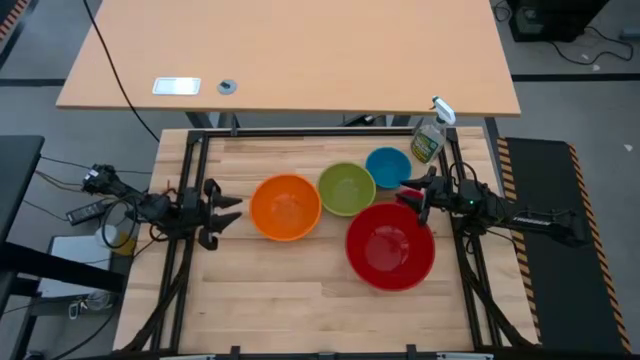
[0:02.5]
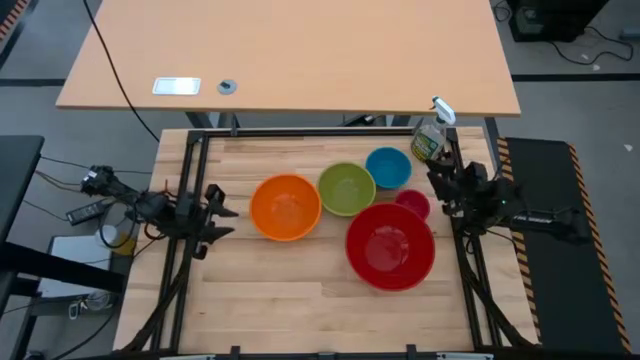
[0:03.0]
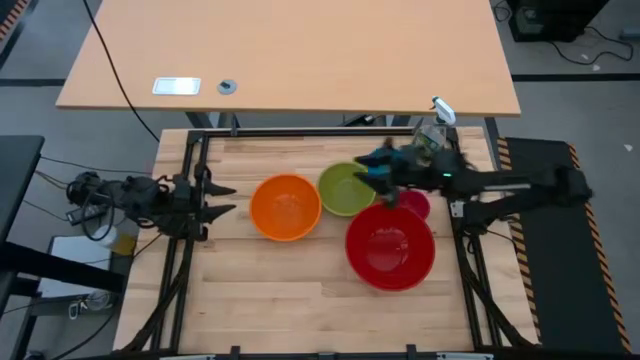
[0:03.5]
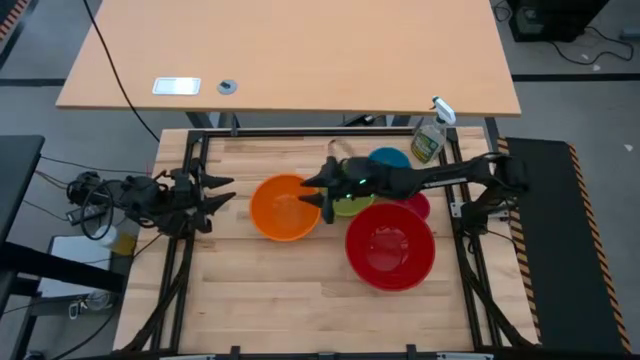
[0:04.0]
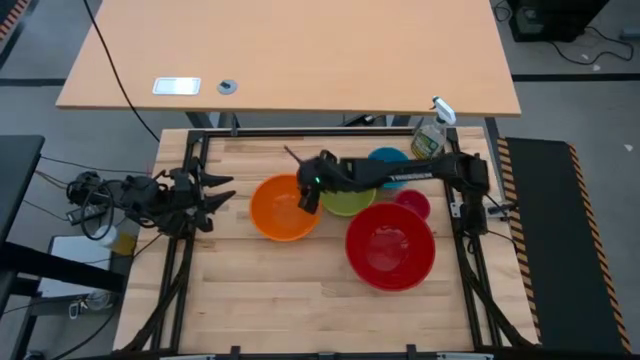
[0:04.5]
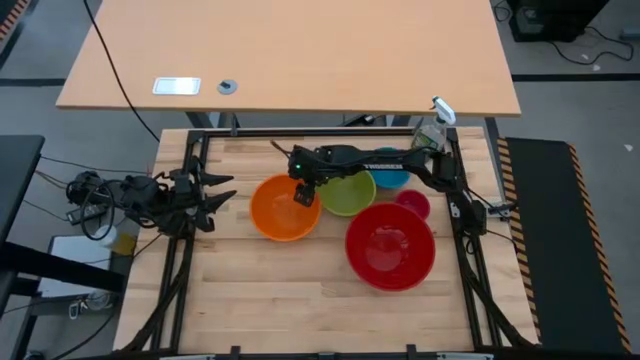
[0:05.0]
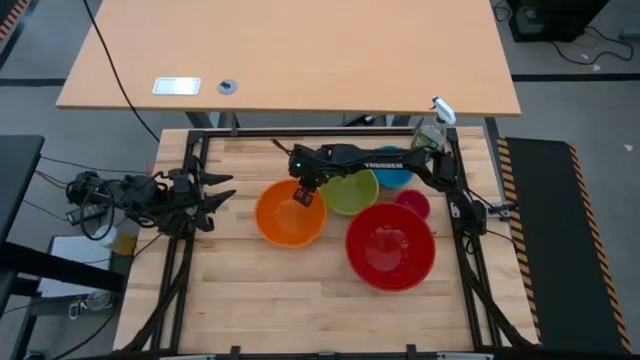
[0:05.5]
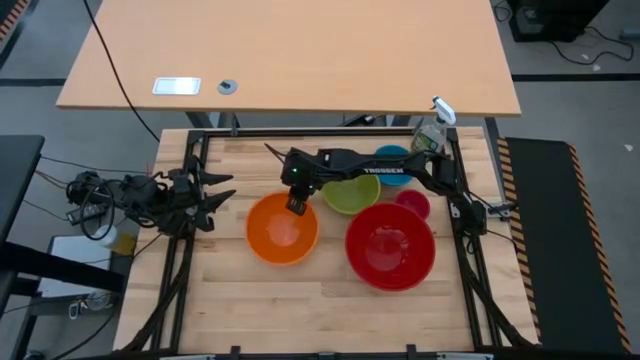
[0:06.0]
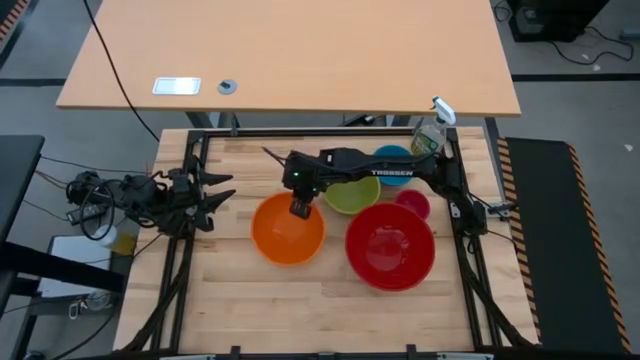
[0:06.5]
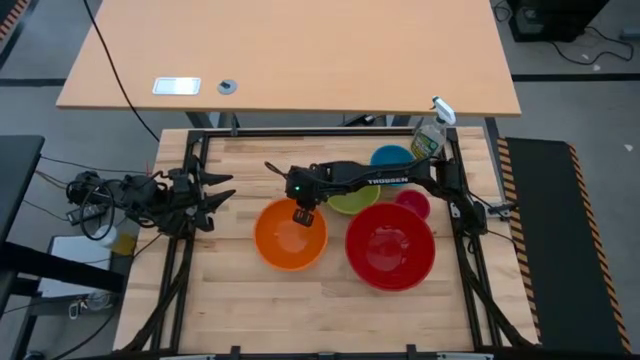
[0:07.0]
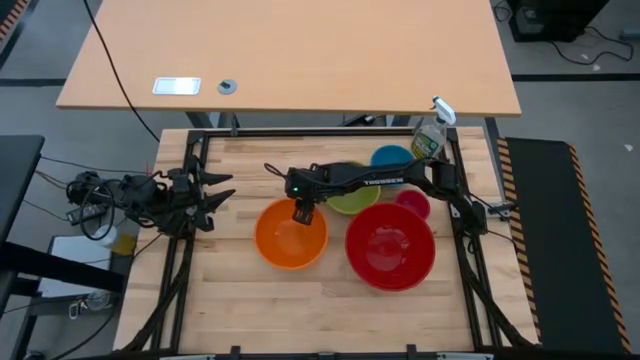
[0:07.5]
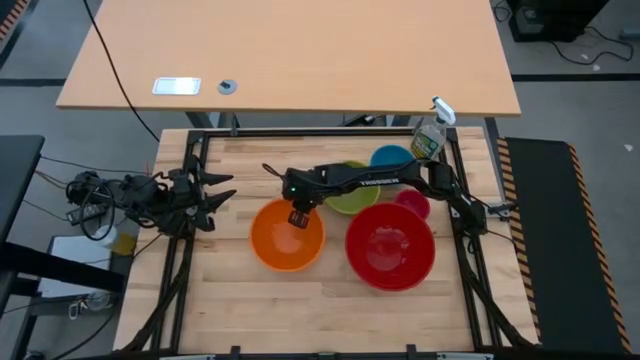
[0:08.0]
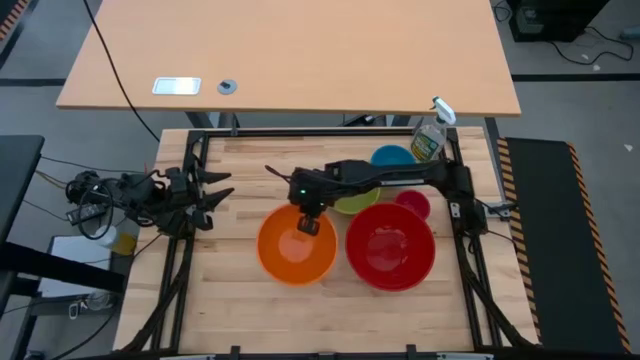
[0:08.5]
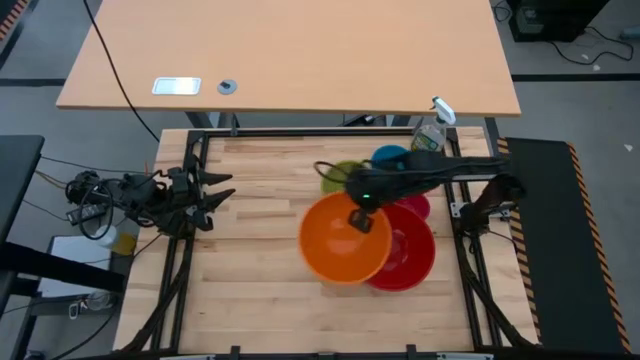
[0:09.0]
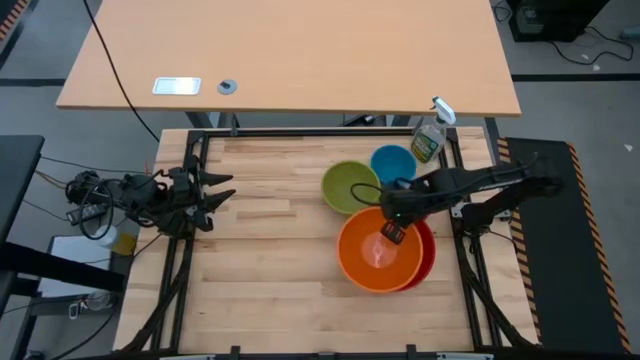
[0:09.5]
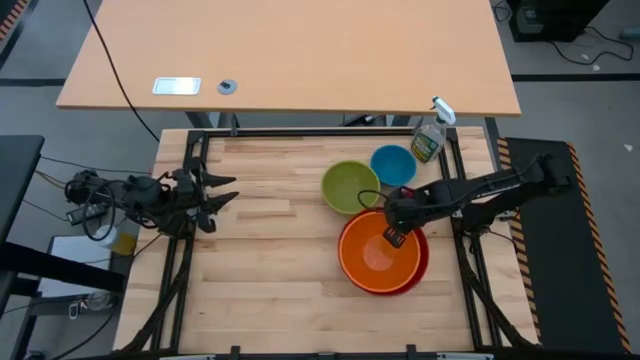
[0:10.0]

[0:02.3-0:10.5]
Stack the orange bowl on top of the red bowl

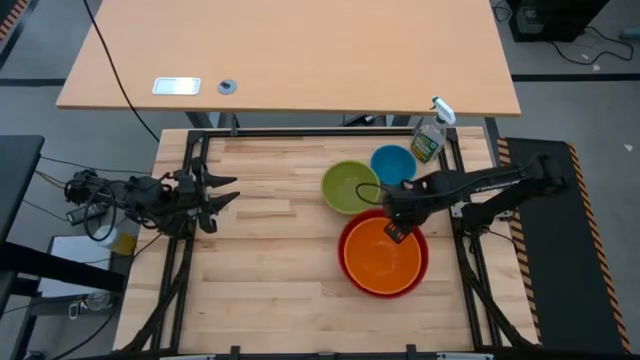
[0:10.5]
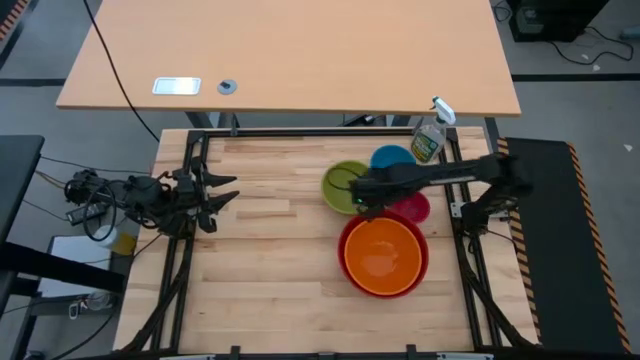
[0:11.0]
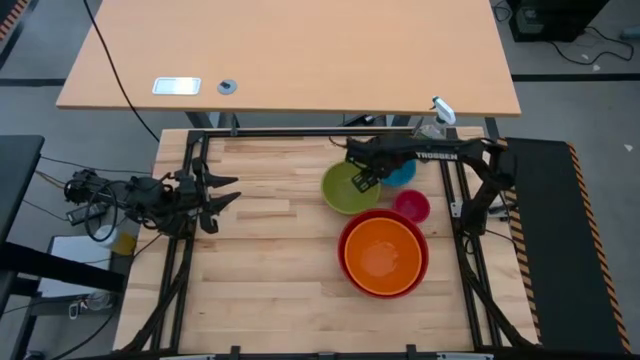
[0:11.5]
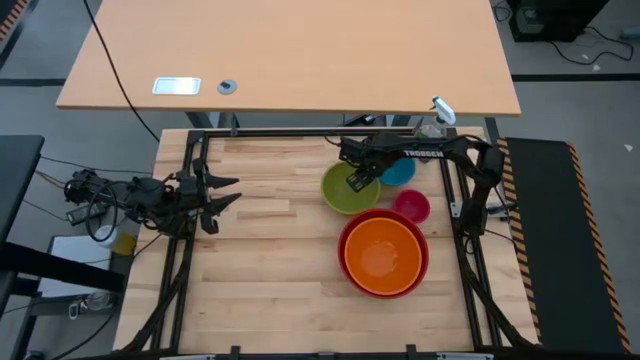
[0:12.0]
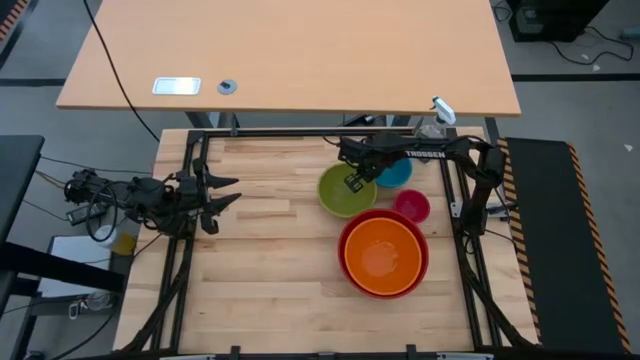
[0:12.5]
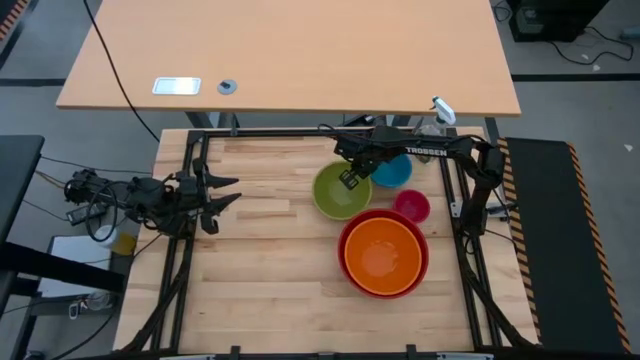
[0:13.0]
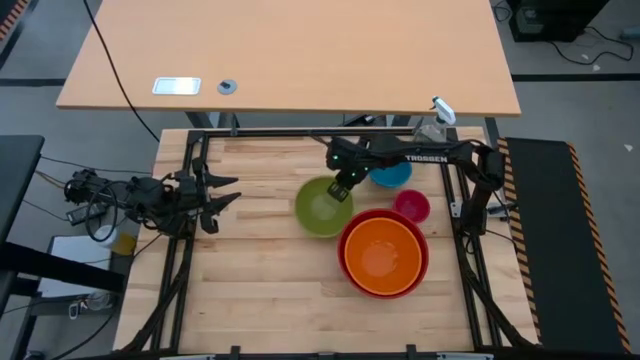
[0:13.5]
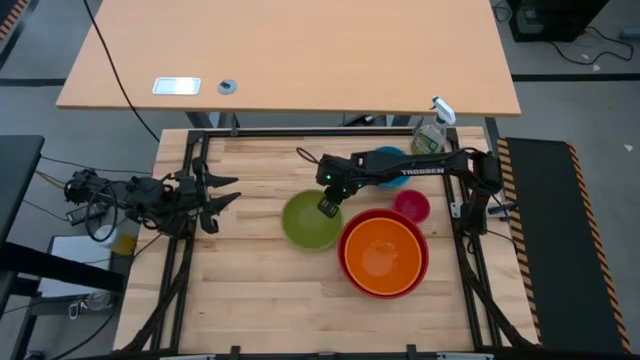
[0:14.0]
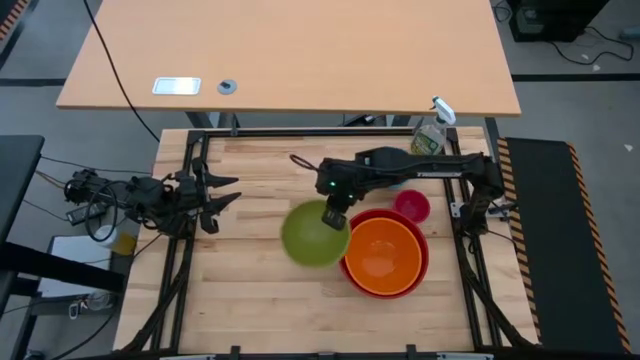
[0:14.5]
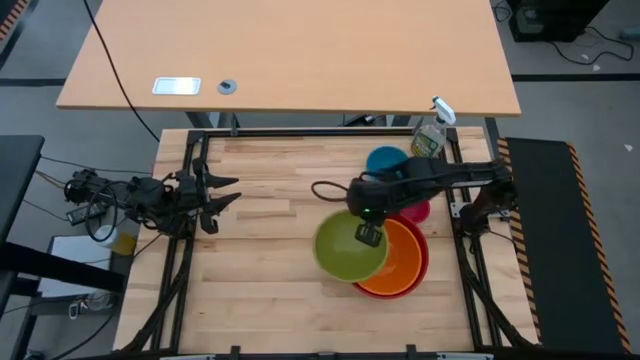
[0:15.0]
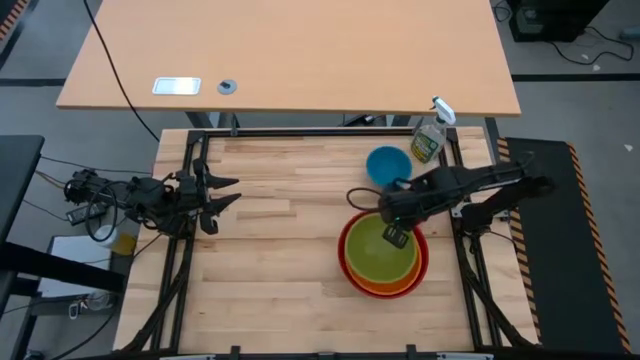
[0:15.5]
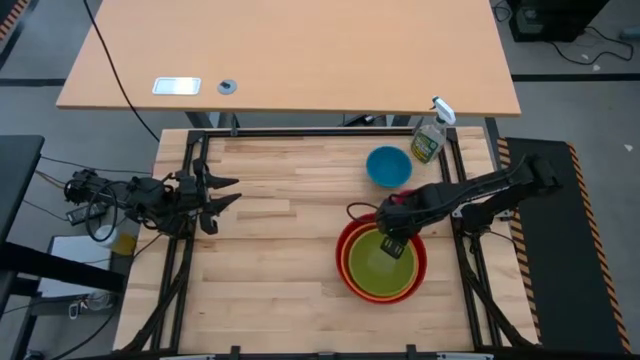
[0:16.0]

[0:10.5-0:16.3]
Stack the green bowl on top of the orange bowl

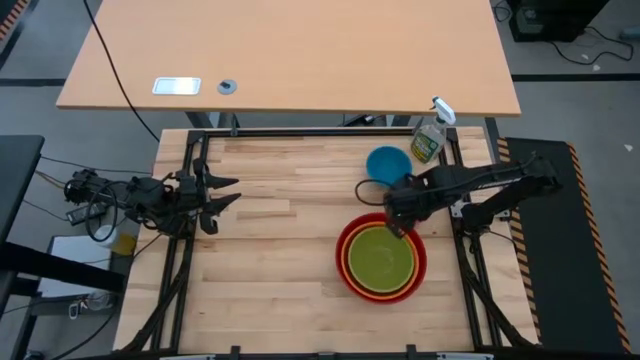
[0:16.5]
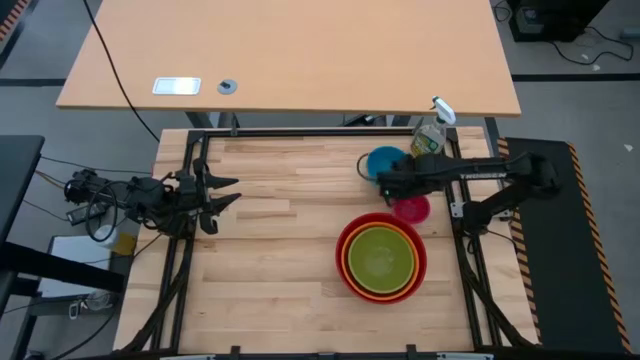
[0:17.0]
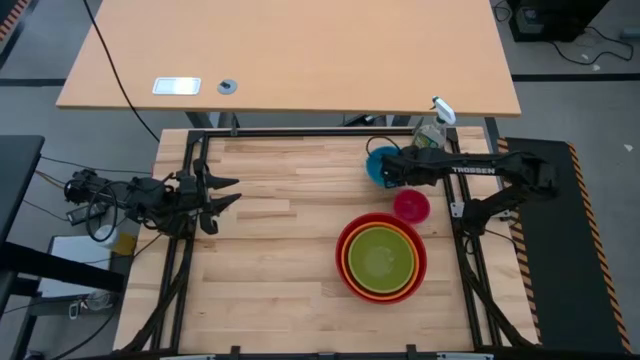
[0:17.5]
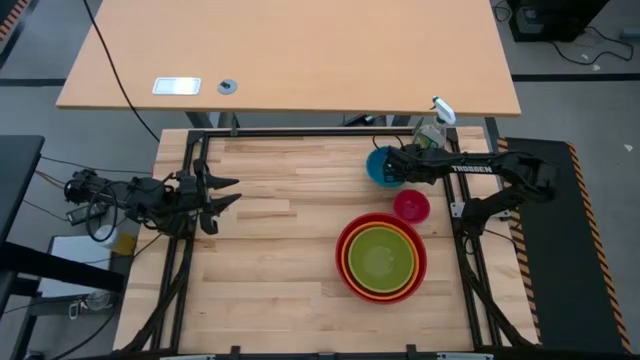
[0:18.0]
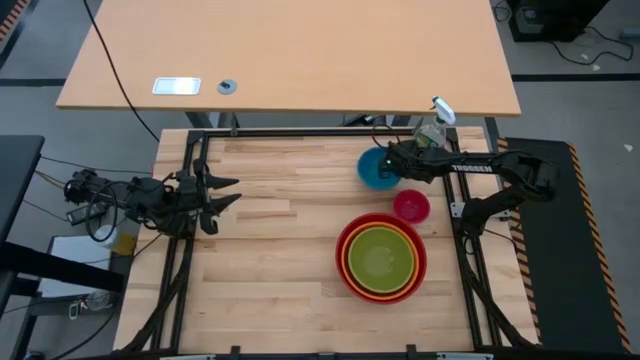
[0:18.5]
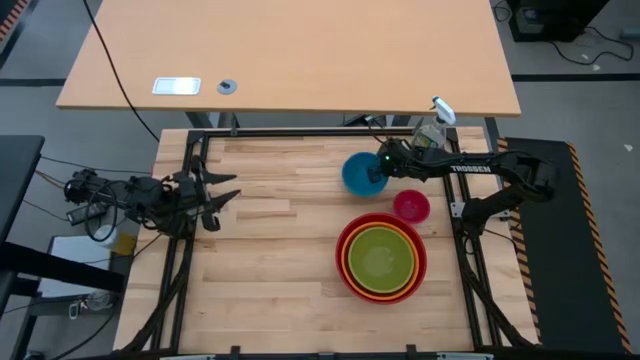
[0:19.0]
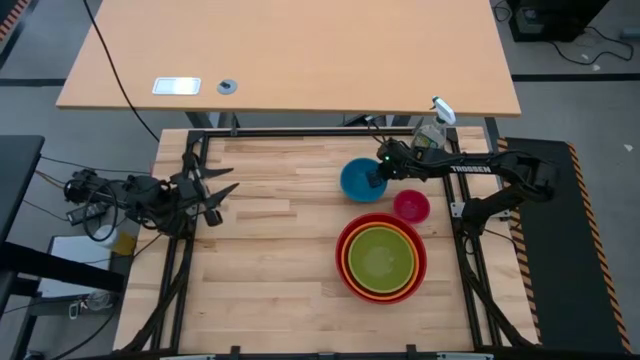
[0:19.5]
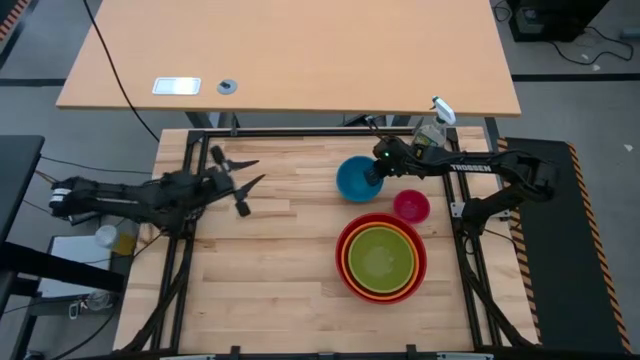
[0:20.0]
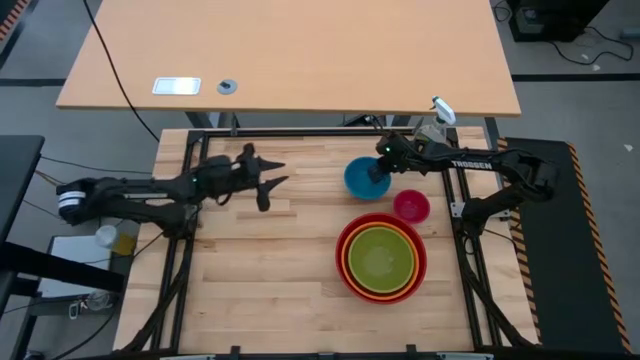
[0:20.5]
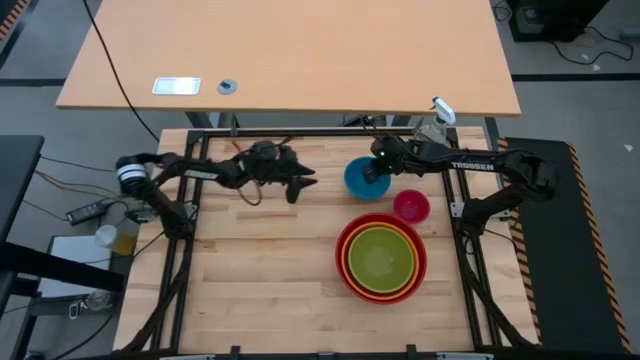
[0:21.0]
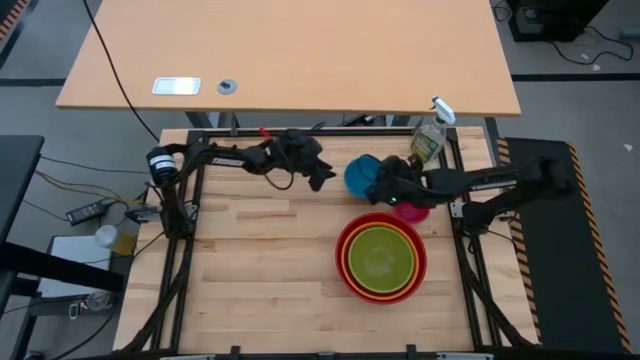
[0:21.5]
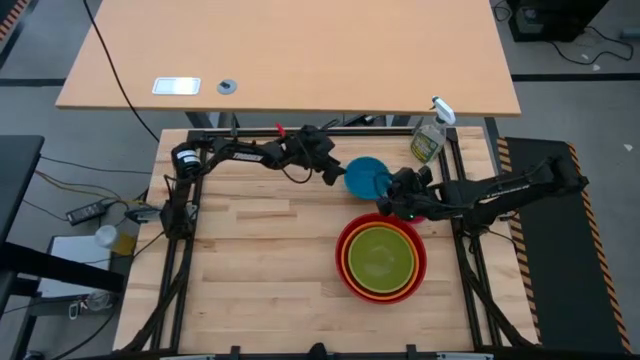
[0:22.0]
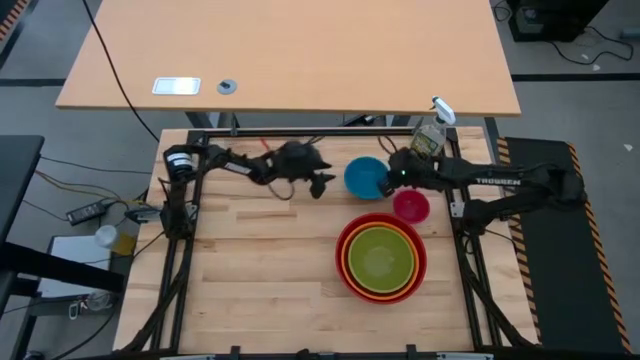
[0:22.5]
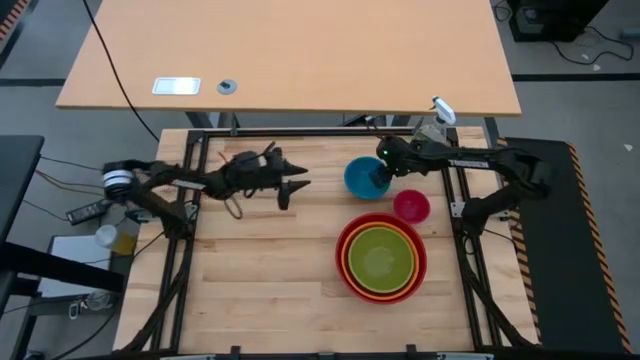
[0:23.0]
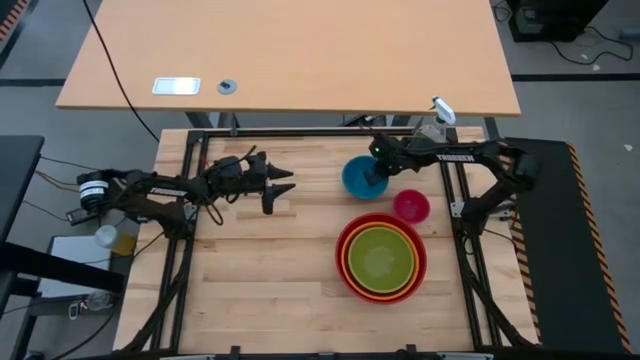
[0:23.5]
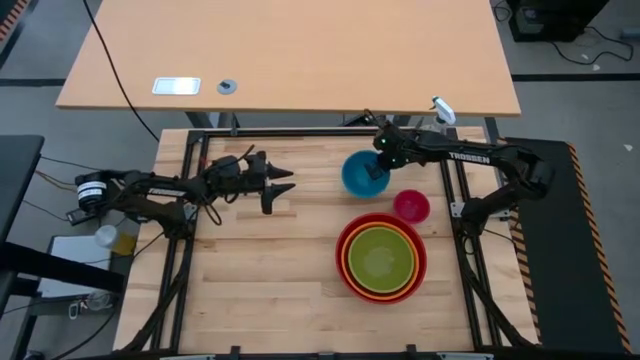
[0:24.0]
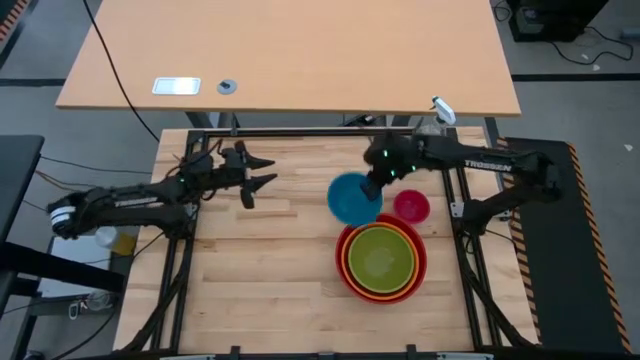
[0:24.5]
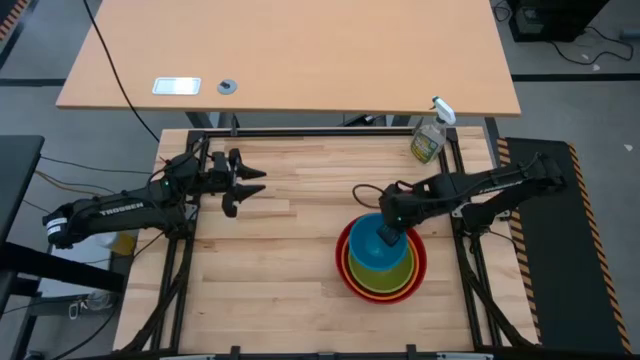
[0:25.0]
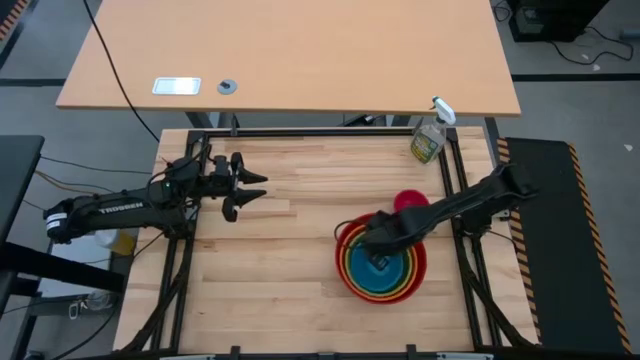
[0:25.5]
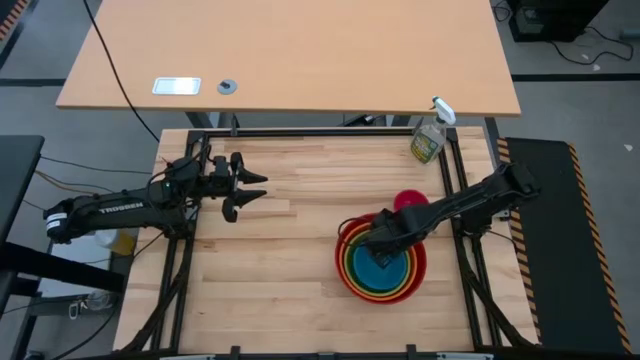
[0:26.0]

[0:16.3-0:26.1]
Stack the blue bowl on top of the green bowl
